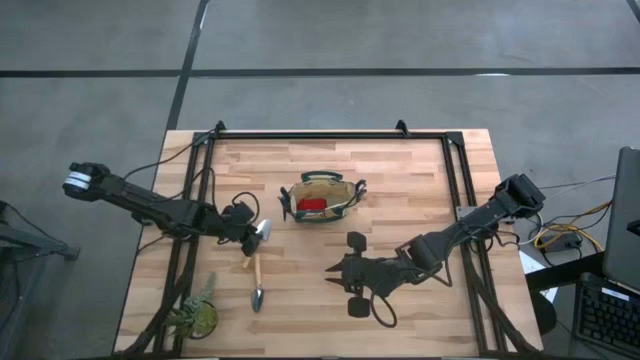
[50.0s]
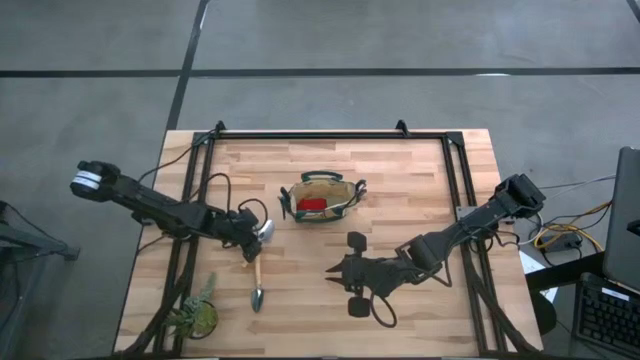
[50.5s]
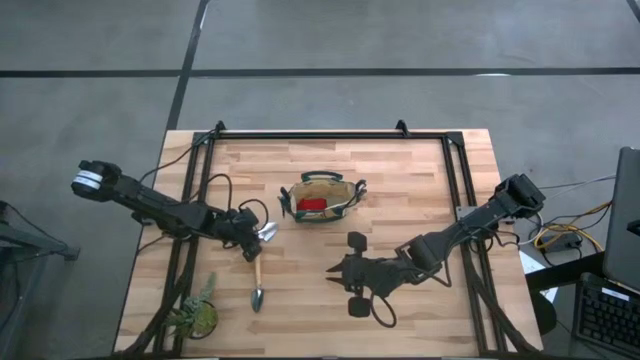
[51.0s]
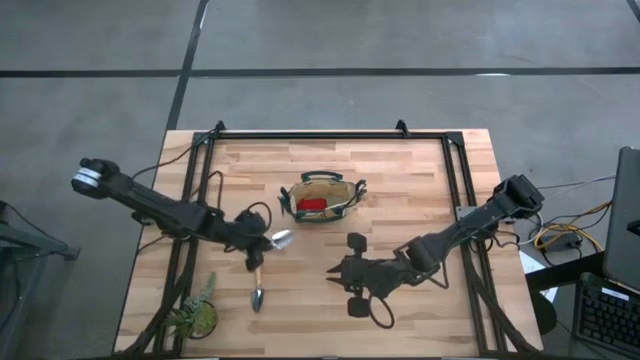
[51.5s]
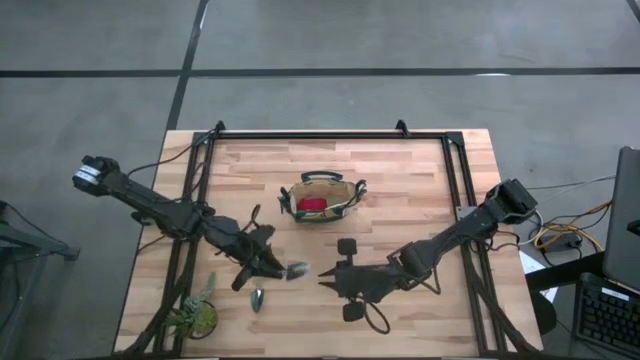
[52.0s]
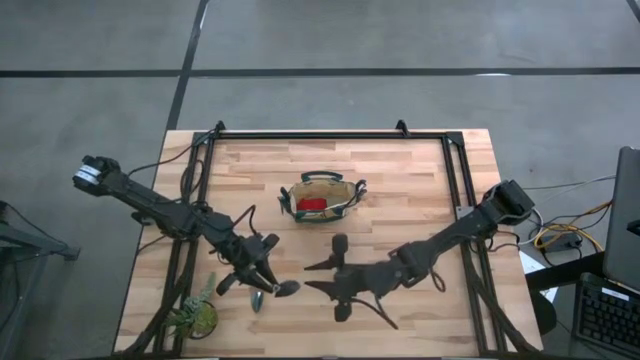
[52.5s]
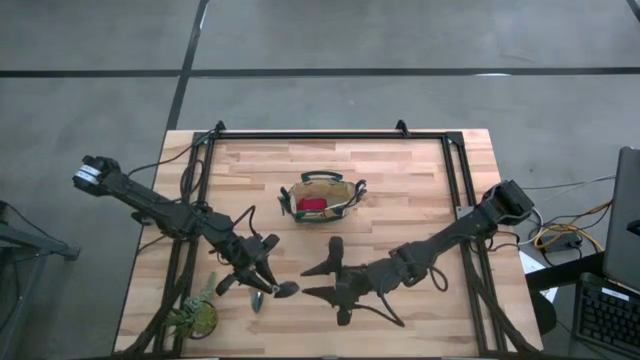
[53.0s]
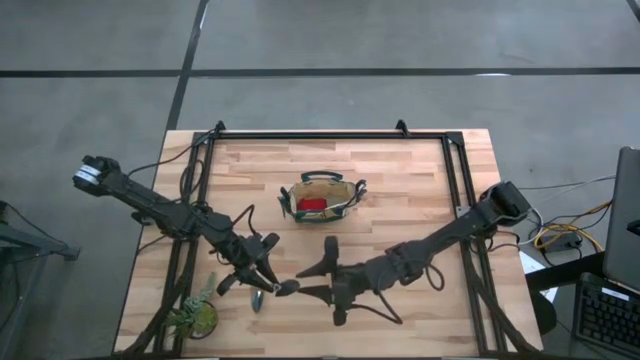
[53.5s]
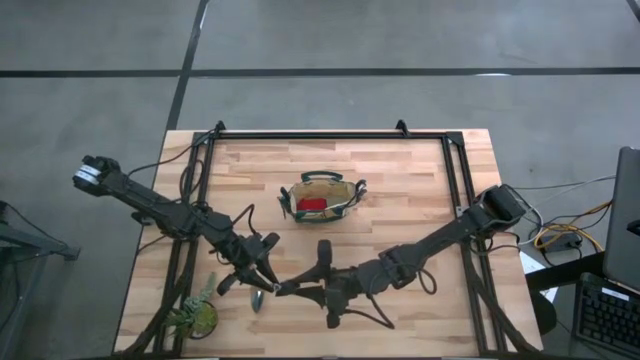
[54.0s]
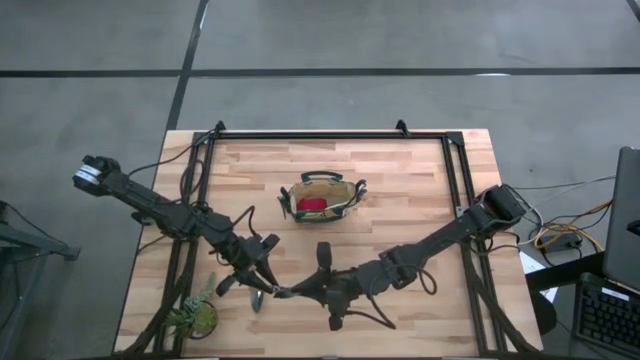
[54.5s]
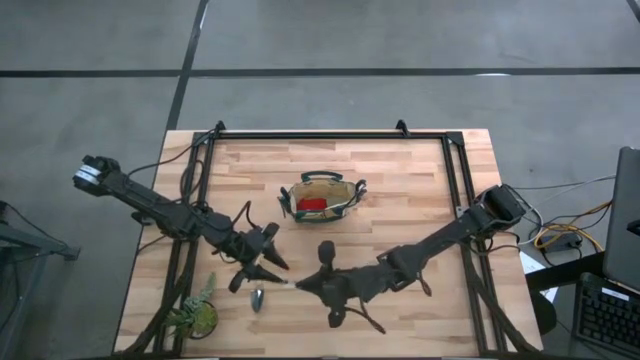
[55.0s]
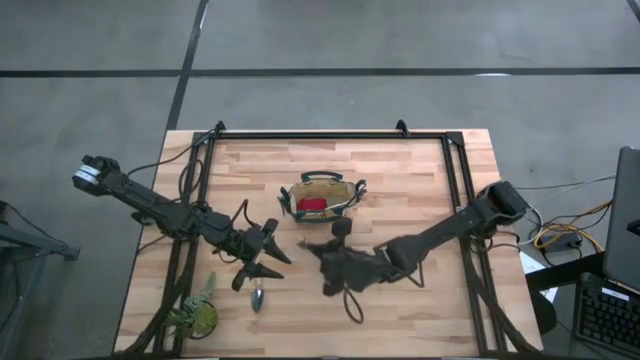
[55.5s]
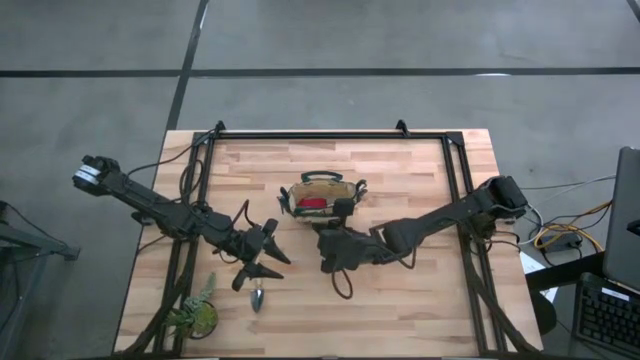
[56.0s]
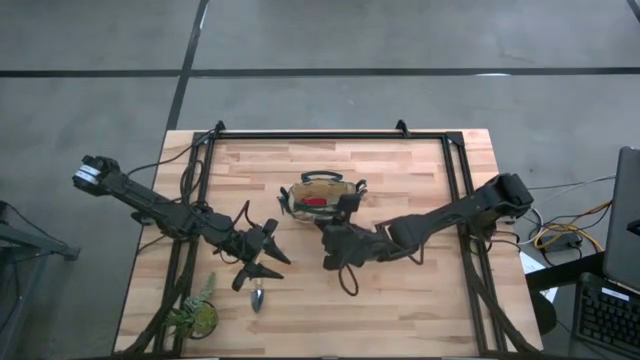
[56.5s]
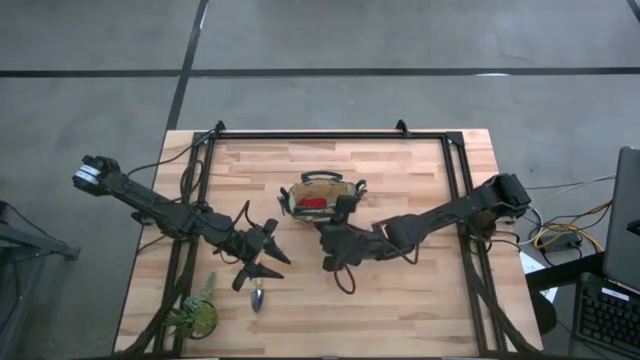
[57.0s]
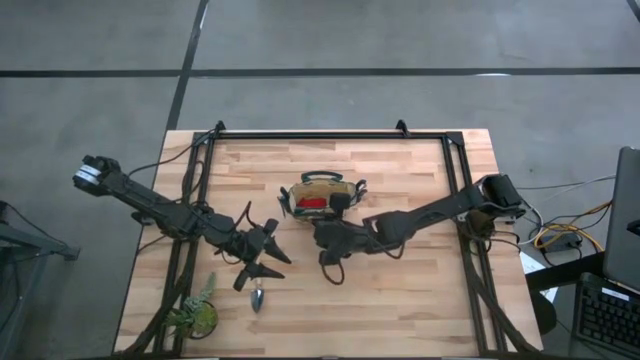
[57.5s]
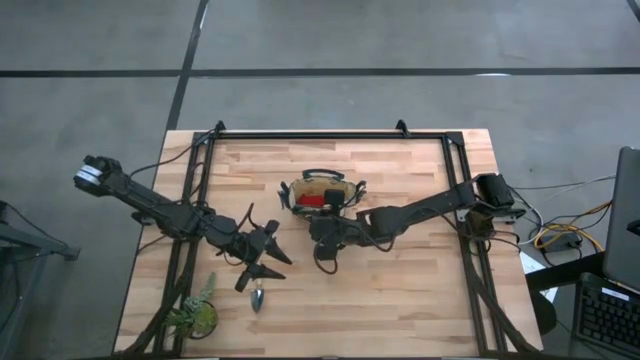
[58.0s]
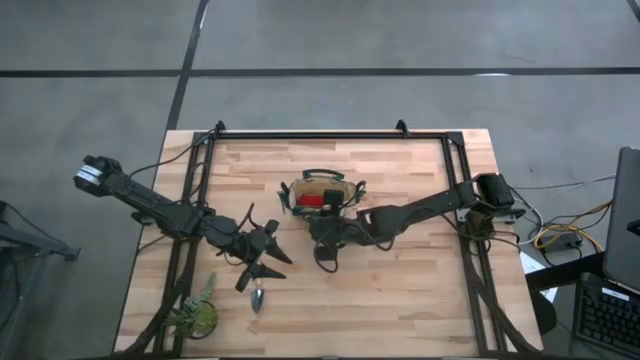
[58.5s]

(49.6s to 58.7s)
Task: Pick & Place Garden tools in Gardening bag
Put the top brown trowel into the light brown gardening bag

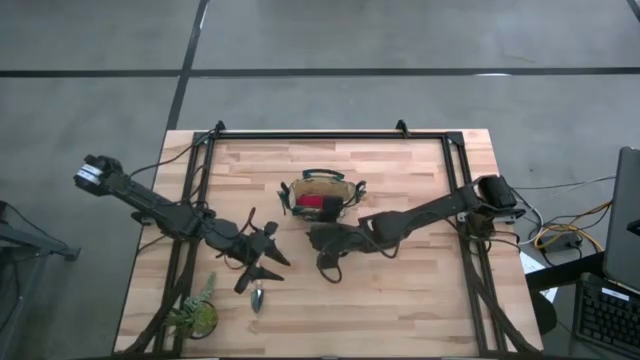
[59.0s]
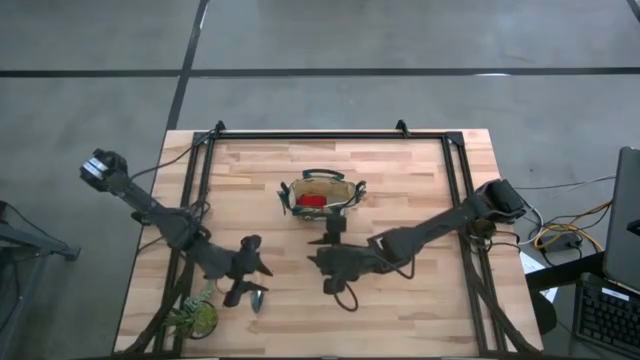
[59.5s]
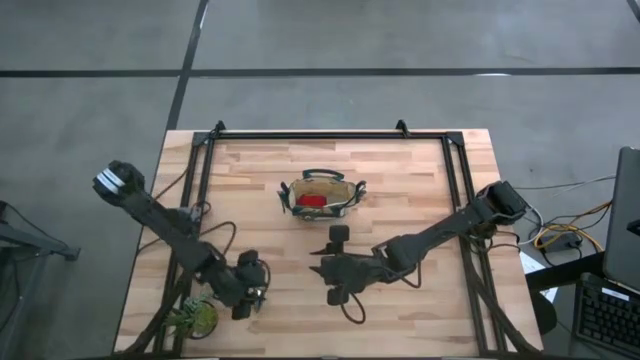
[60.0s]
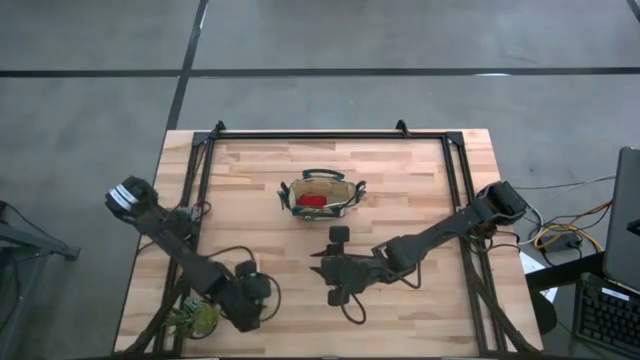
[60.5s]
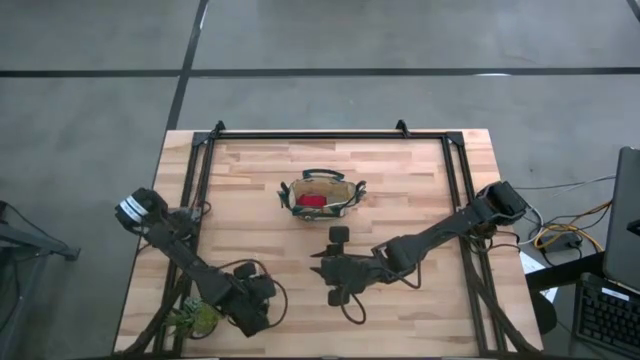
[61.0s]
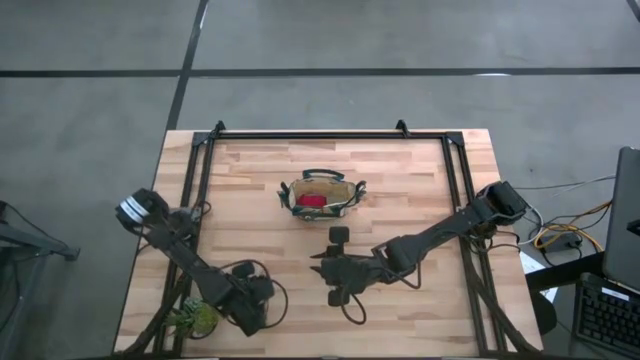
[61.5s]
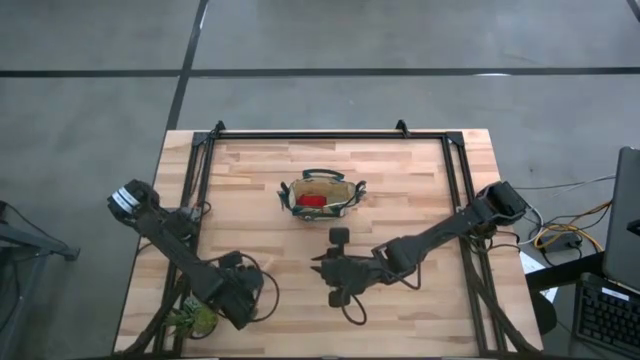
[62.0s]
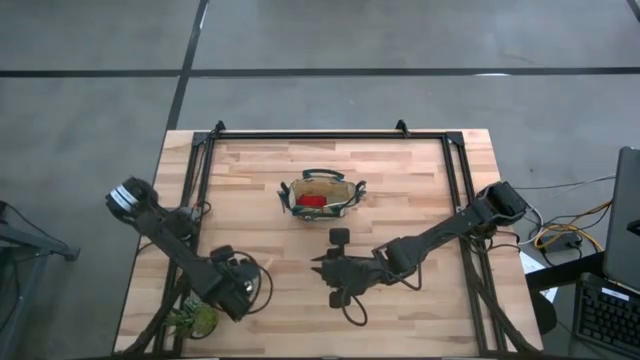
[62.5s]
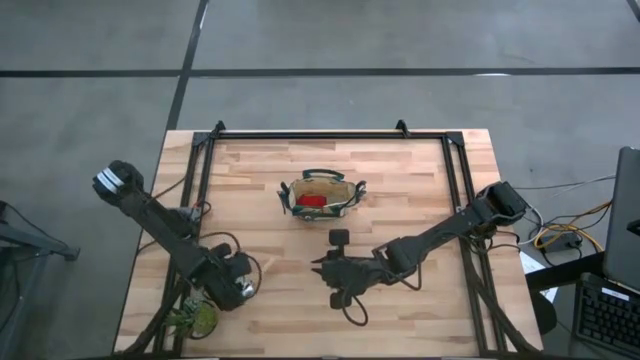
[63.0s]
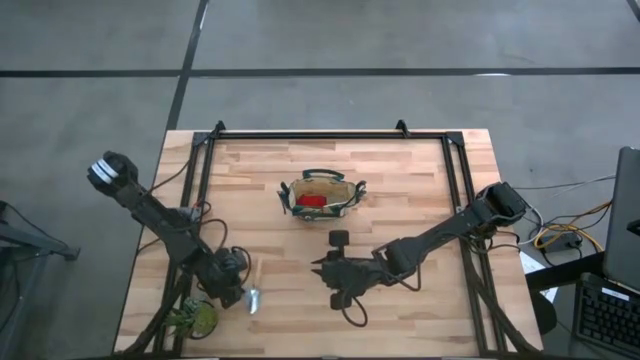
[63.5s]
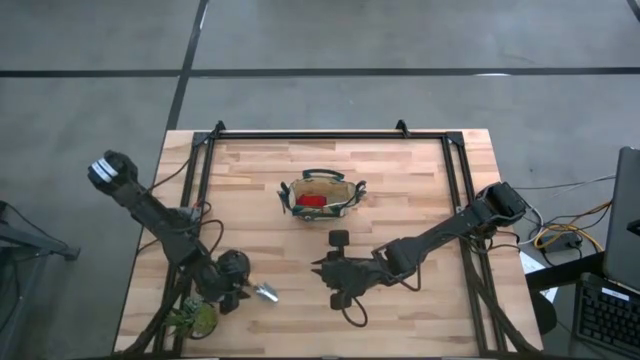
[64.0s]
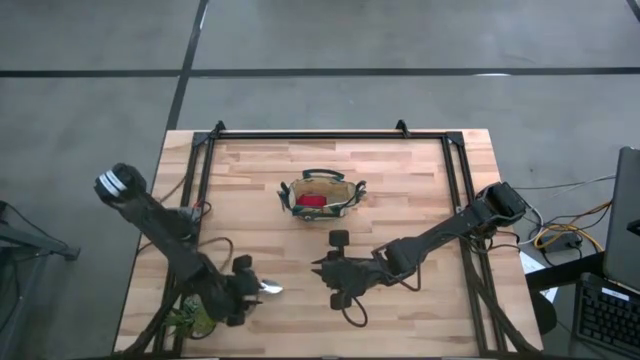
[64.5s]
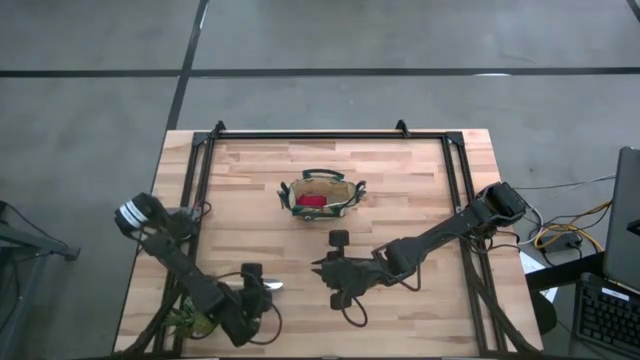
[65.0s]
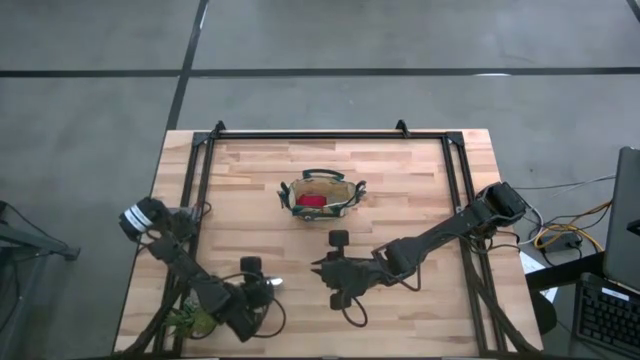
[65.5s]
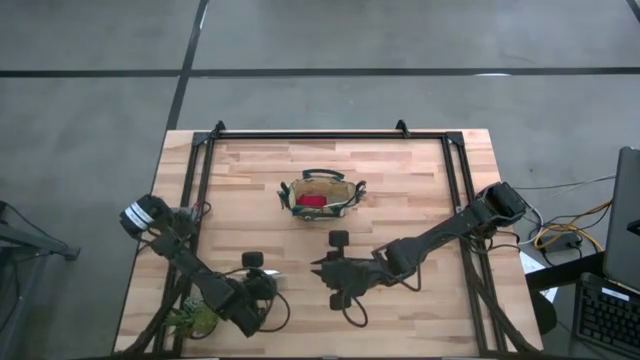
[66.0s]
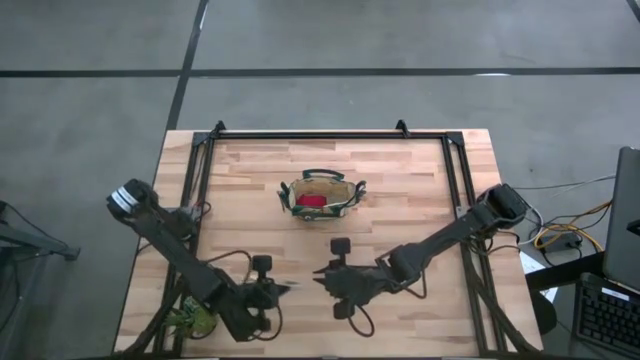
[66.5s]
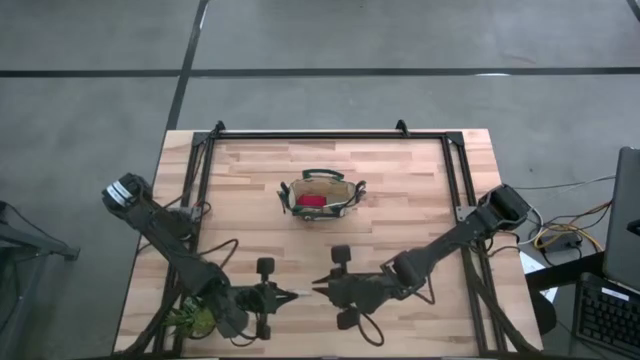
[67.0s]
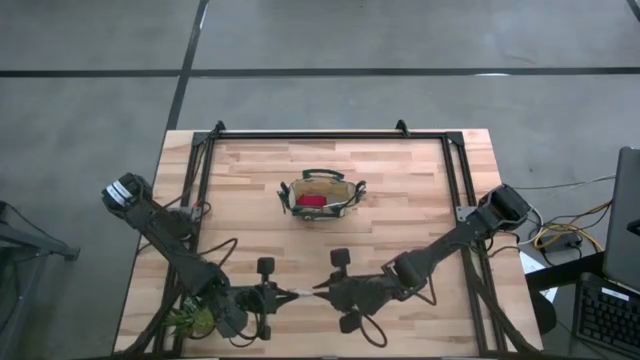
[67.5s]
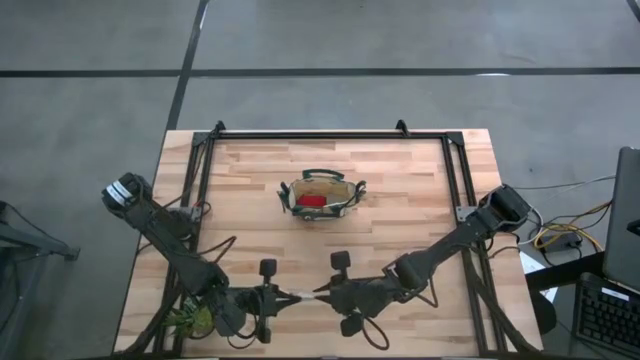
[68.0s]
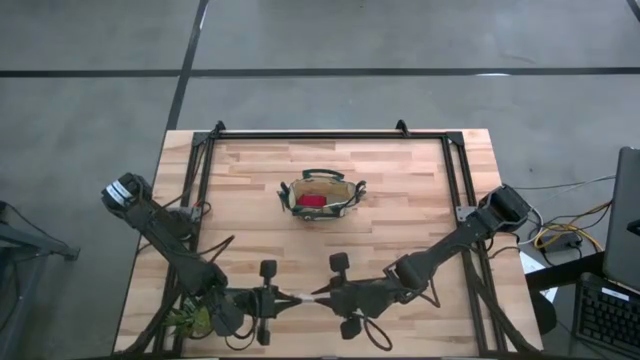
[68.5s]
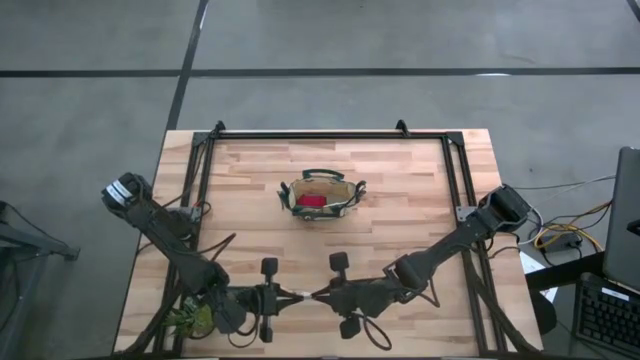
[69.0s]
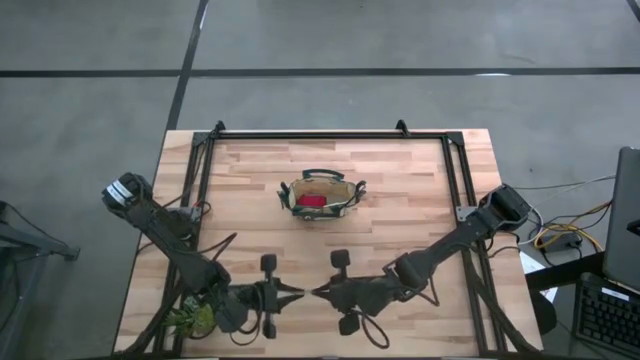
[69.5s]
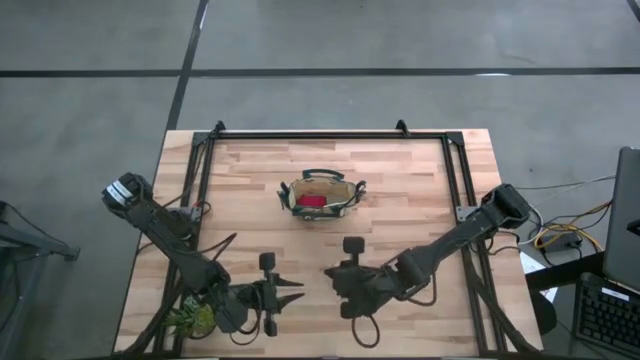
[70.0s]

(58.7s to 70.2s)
Put the brown trowel into the light brown gardening bag

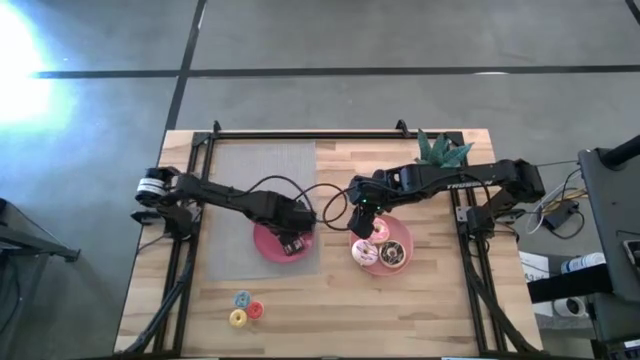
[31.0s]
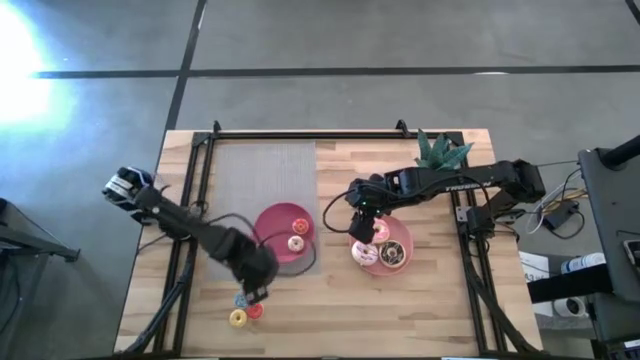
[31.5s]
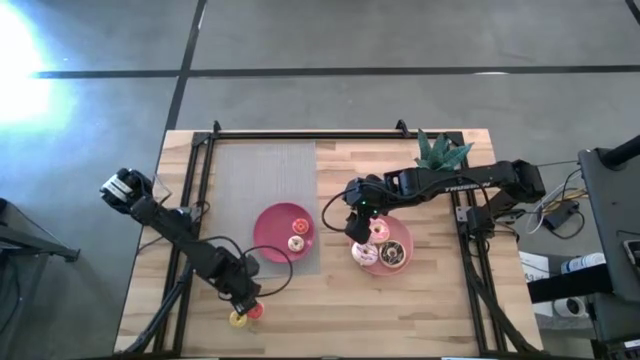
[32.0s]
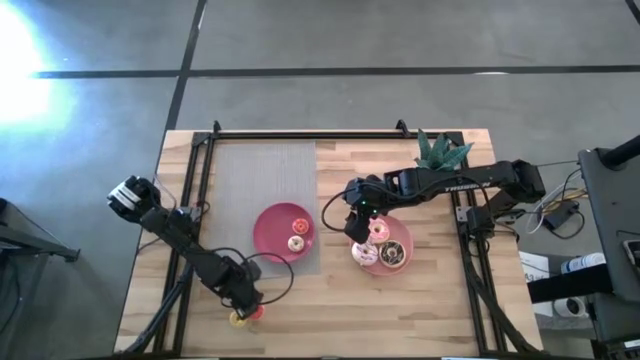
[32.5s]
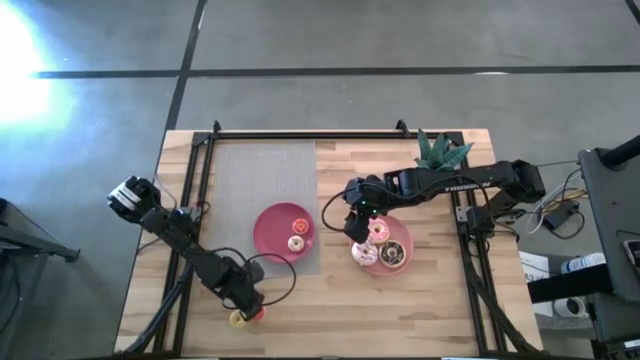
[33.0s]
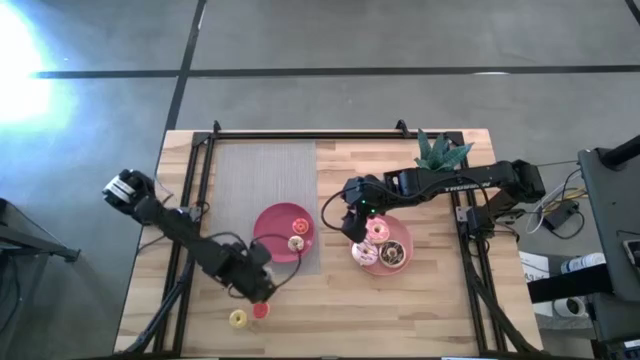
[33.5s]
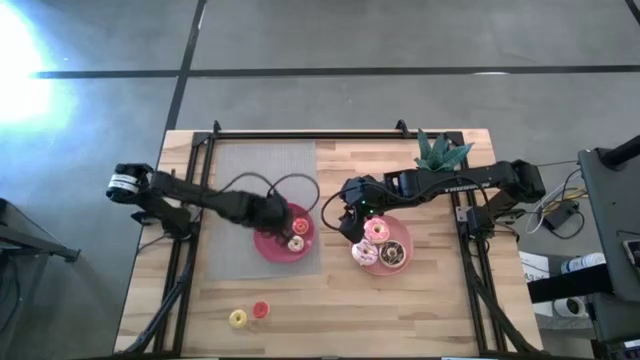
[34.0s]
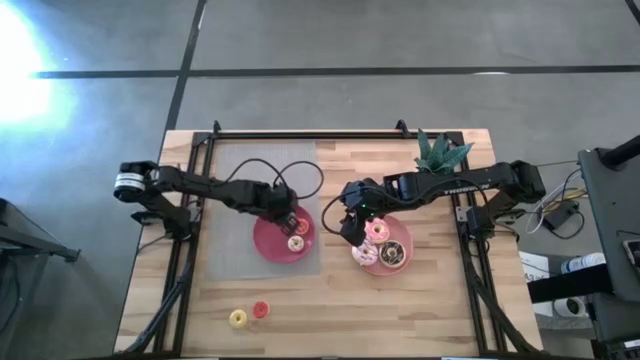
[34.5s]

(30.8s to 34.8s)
Task: Pick & Place donuts
Put the small blue donut on the dark pink plate
